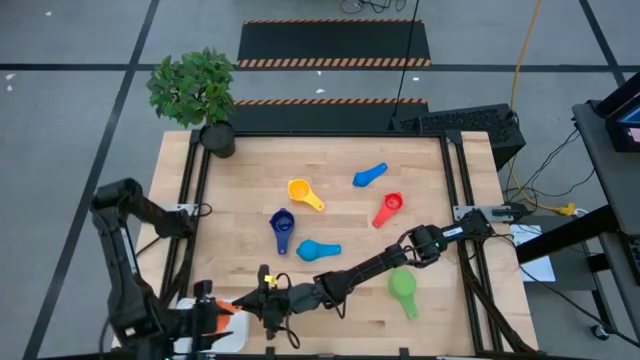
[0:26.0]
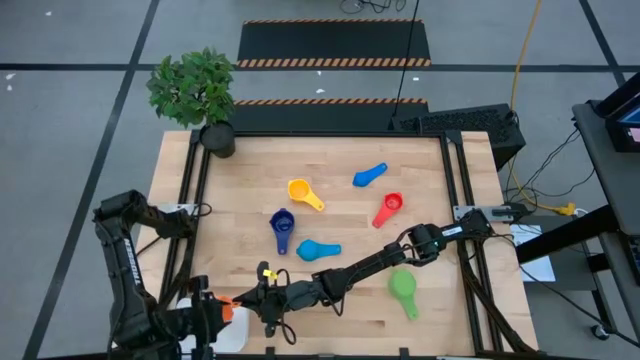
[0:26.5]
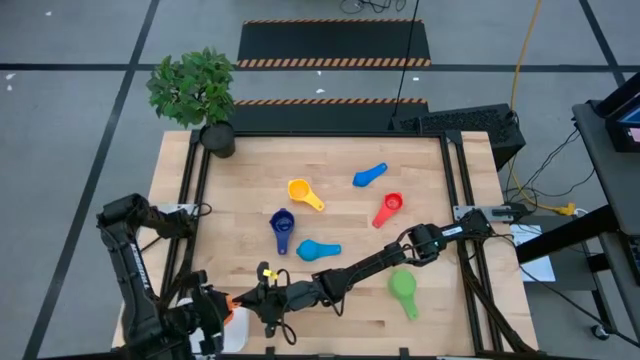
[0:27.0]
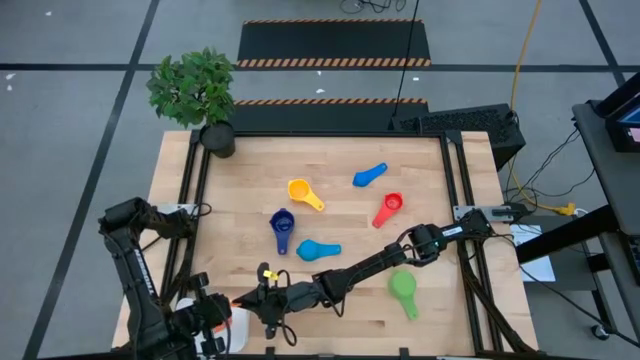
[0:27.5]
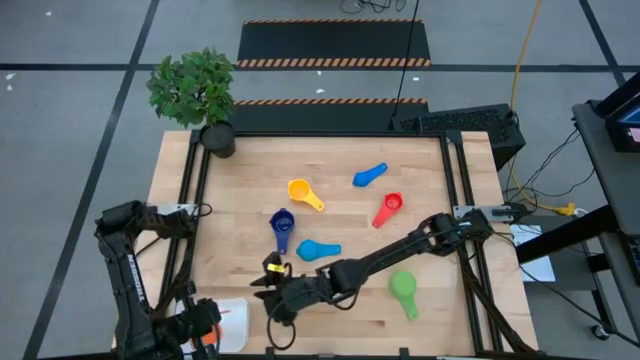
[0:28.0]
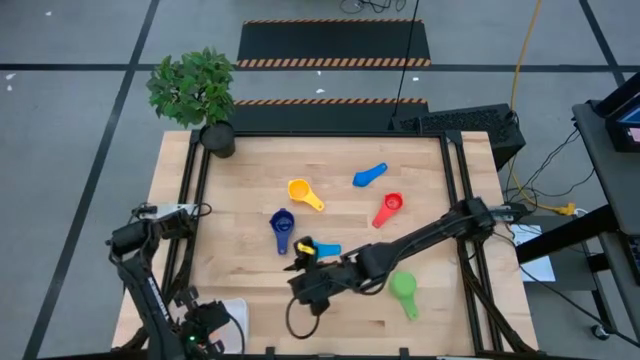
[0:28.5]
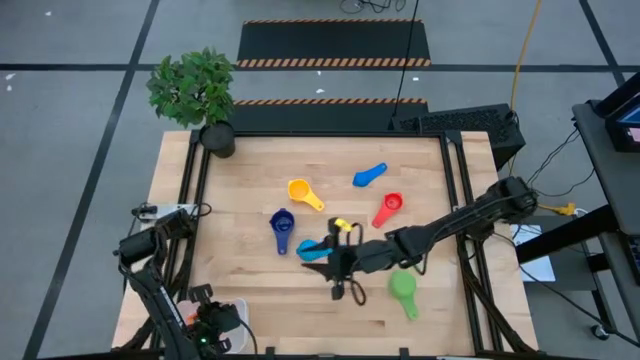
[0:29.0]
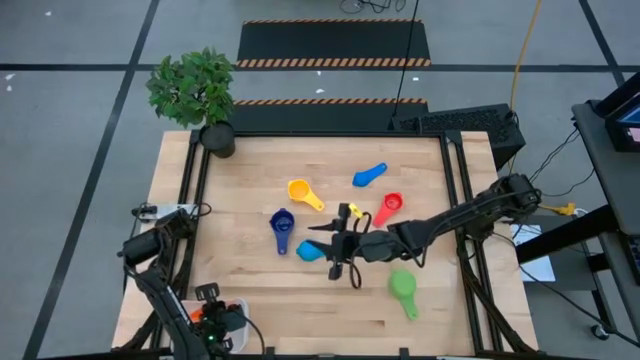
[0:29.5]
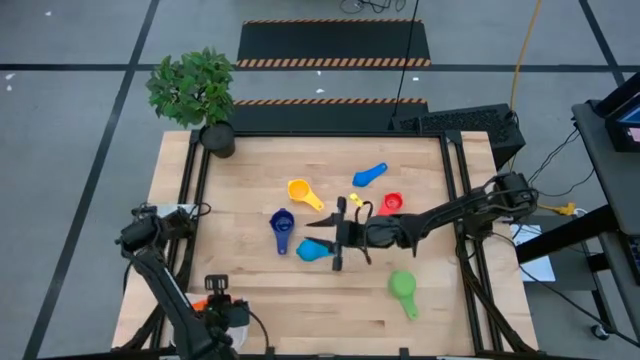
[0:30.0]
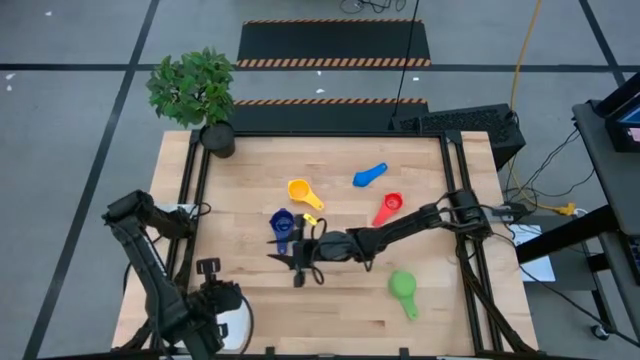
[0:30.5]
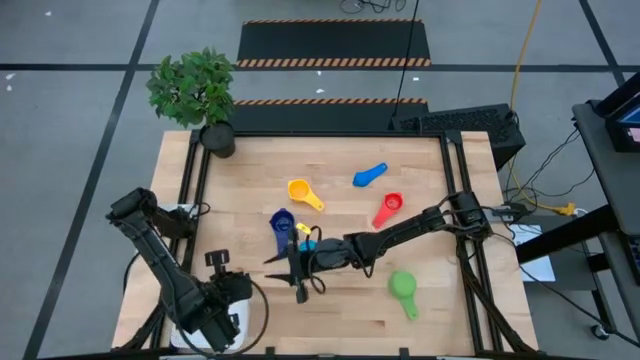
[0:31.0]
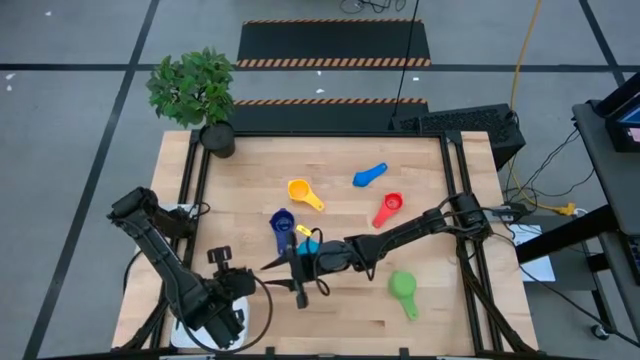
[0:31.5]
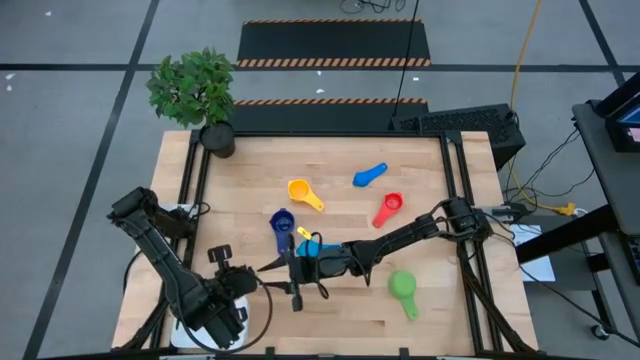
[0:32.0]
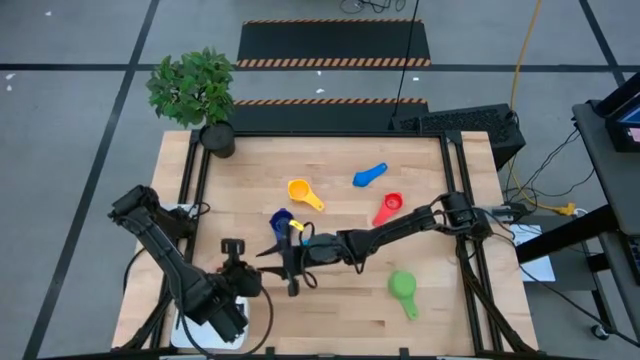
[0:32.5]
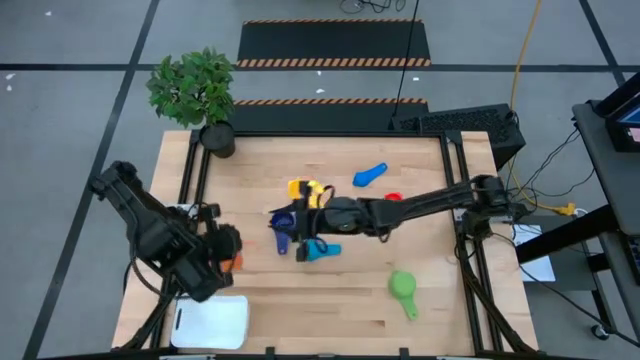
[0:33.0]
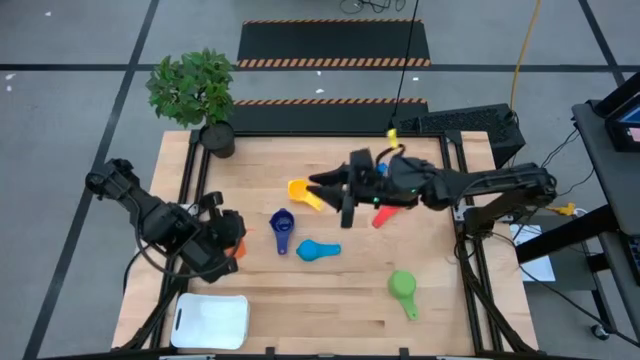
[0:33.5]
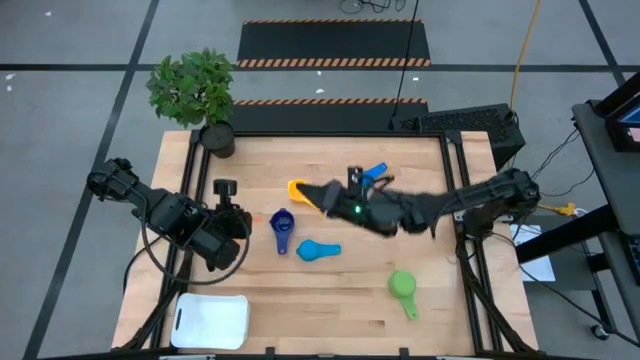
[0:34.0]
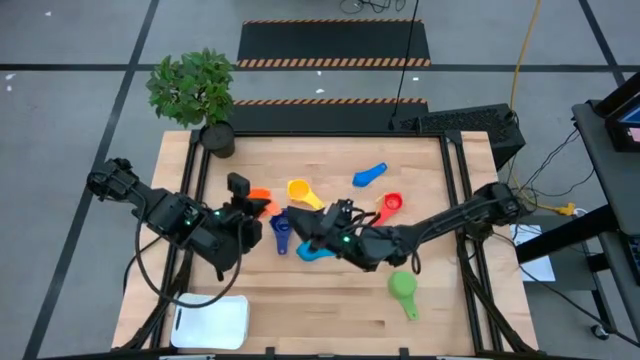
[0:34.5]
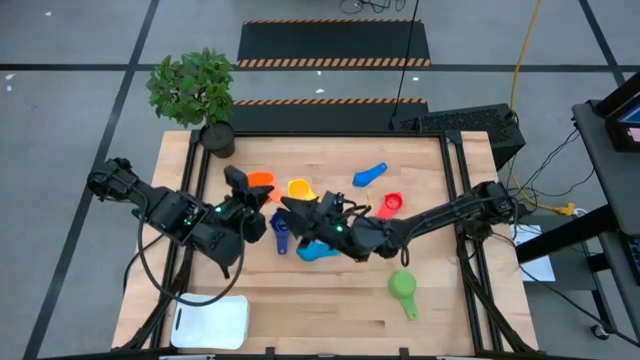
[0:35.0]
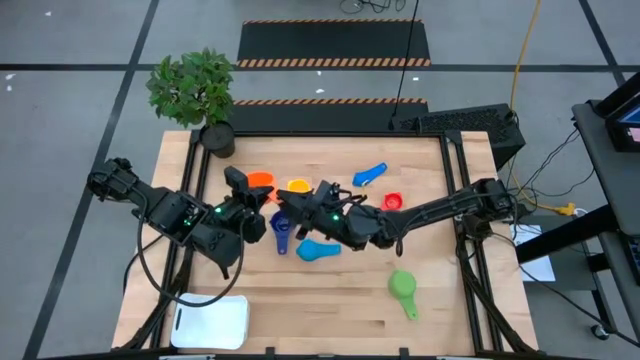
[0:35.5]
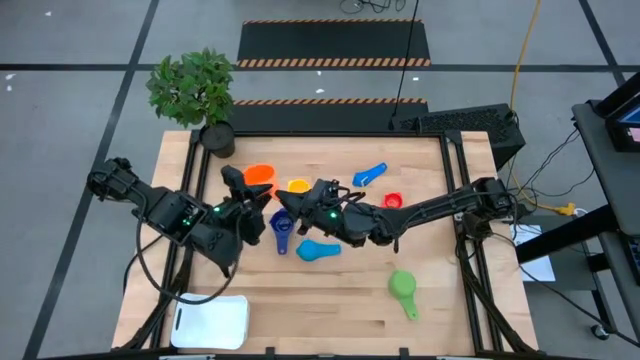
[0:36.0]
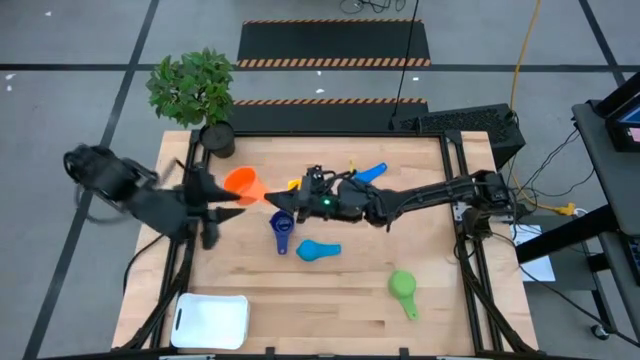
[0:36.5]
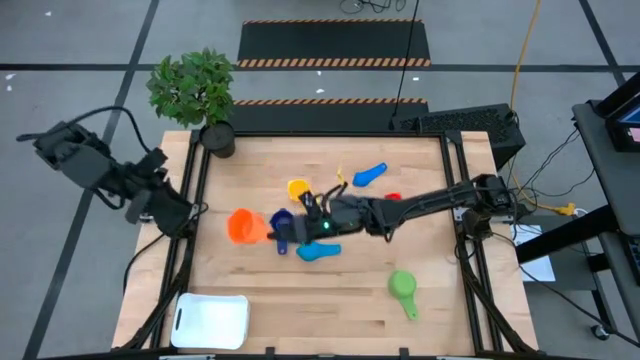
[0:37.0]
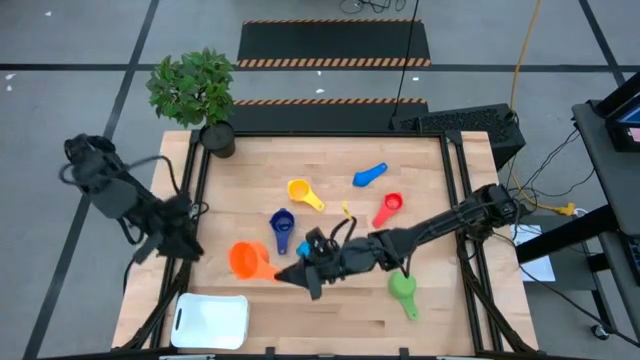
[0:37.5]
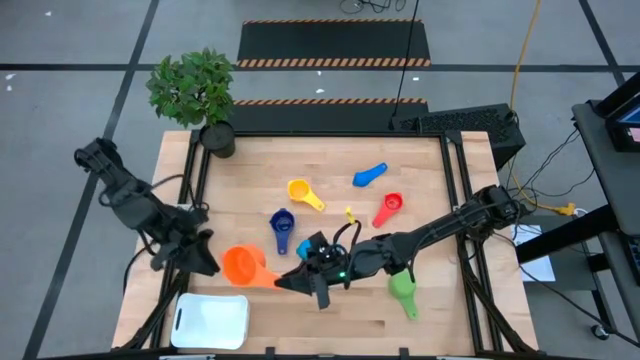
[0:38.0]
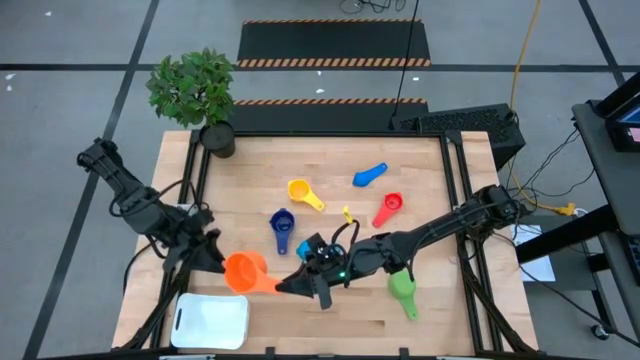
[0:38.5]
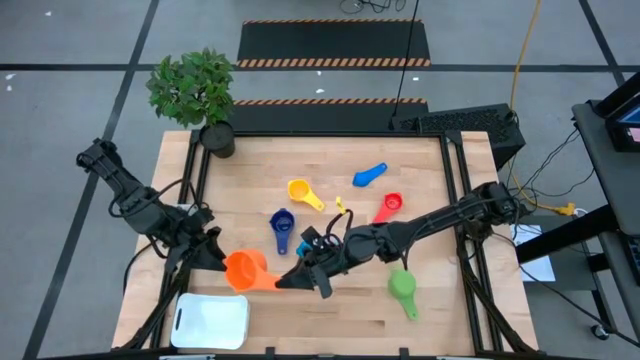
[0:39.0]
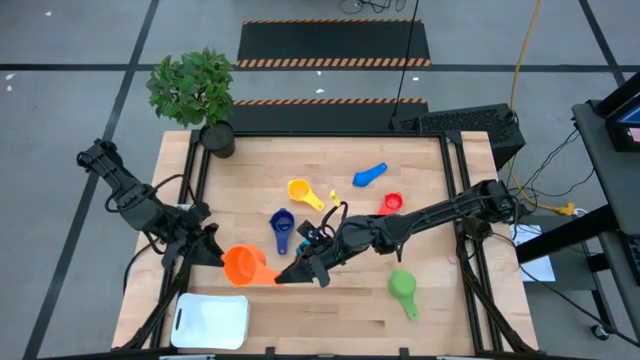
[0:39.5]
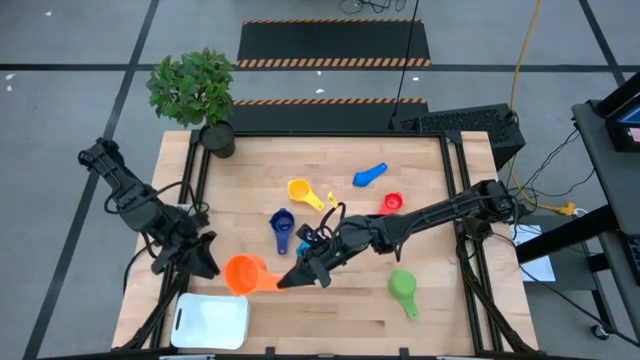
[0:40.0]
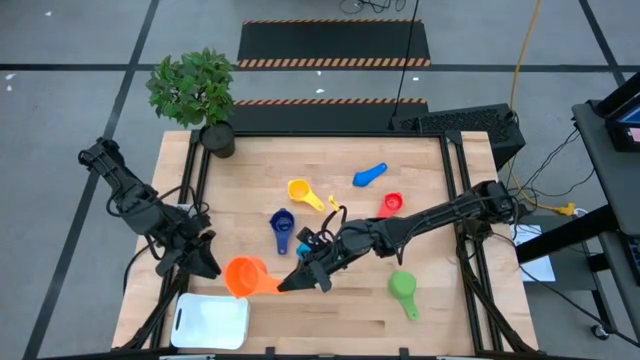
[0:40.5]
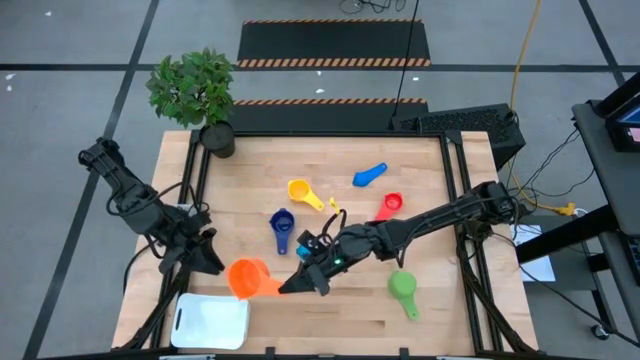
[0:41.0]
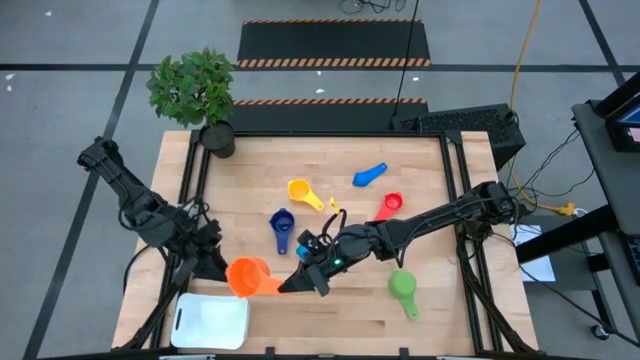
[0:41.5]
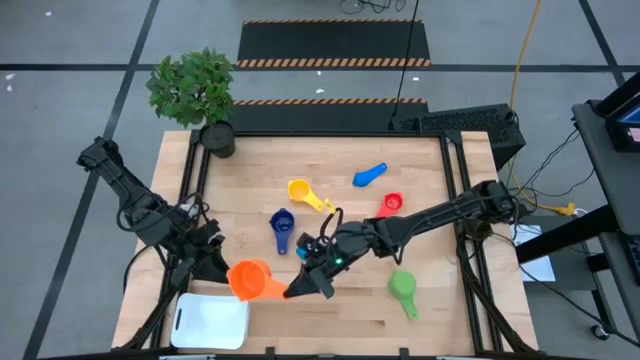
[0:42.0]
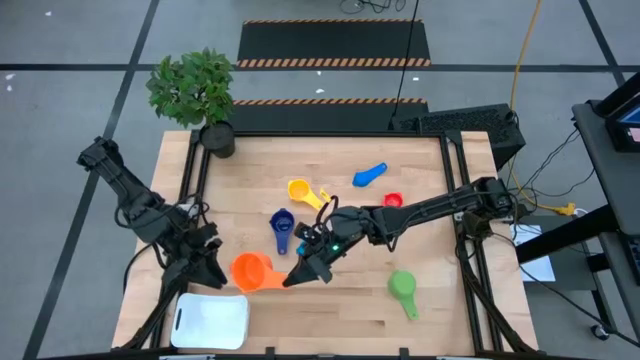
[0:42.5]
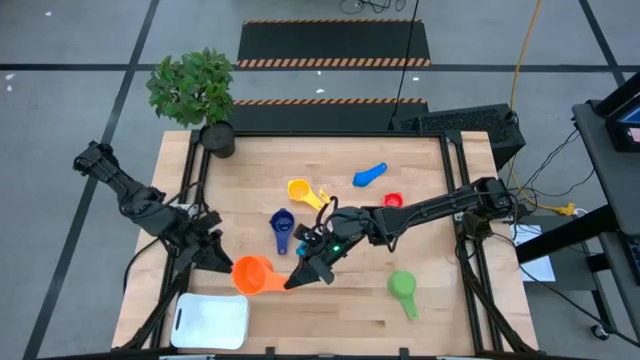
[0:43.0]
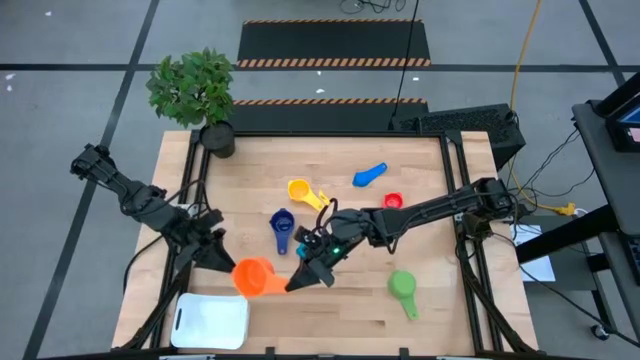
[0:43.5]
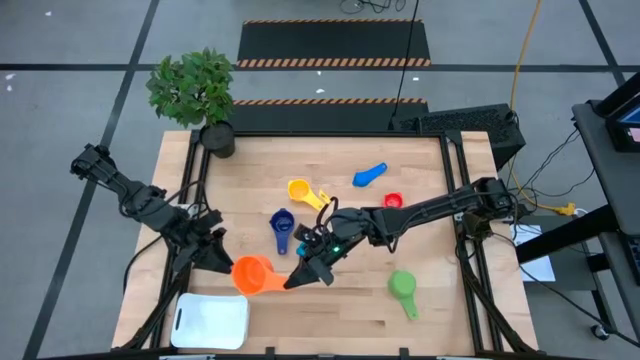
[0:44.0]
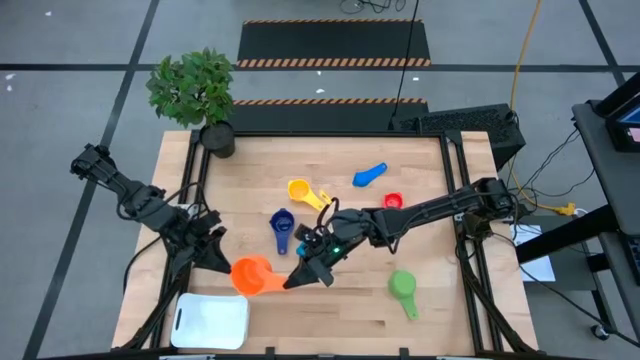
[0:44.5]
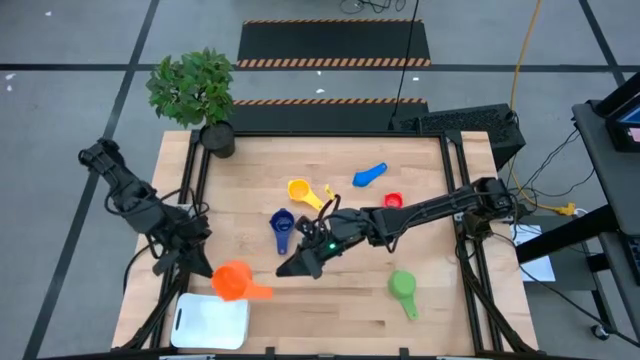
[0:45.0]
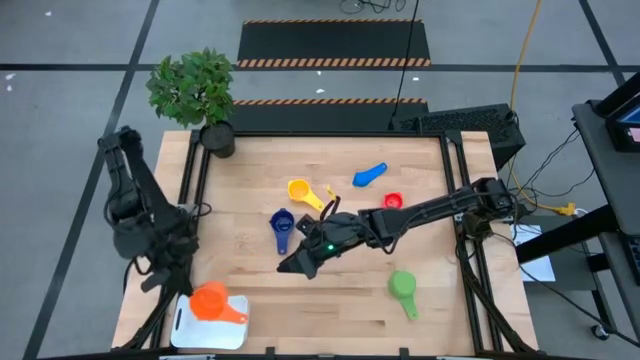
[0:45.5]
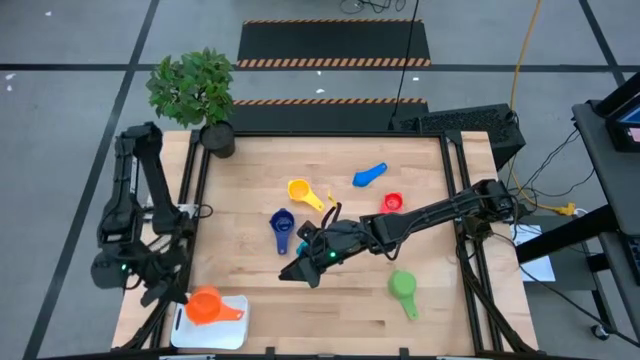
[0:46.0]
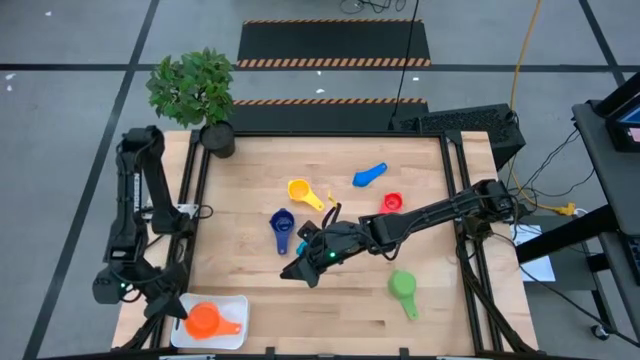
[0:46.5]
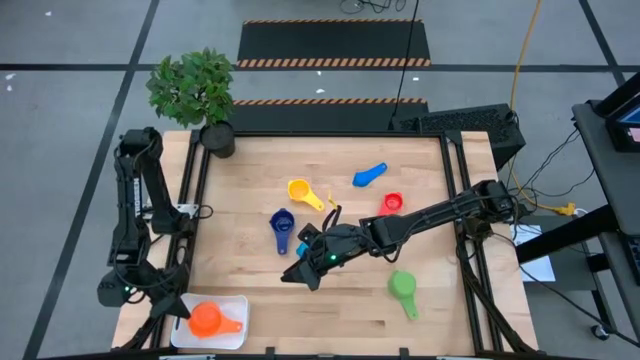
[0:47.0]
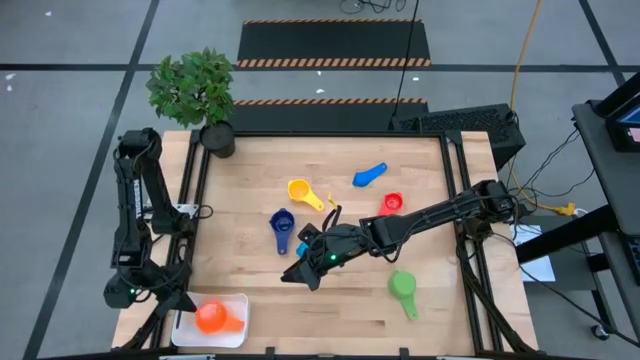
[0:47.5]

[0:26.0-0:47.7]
Task: Nest measuring cups in basket
Put the orange measuring cup into the white bin
